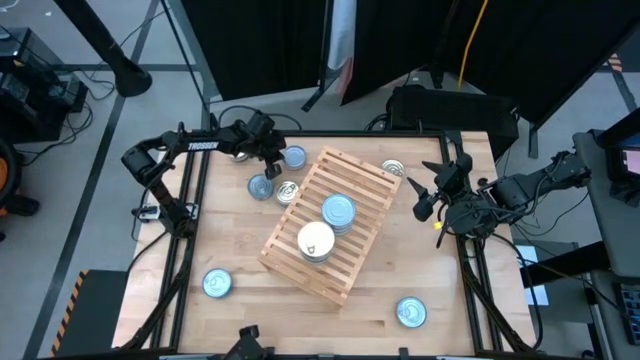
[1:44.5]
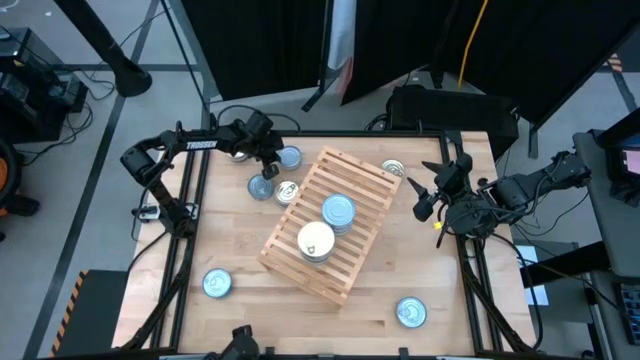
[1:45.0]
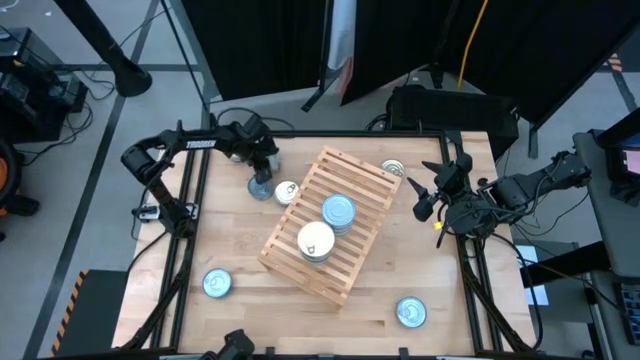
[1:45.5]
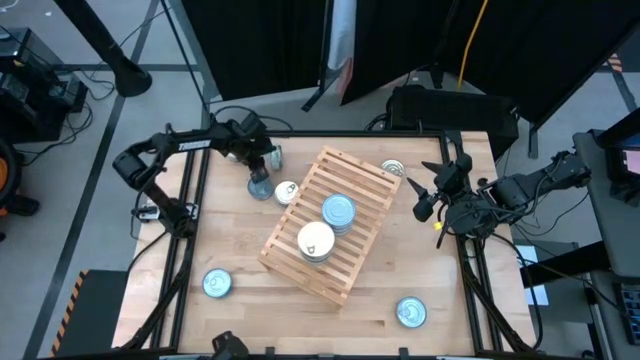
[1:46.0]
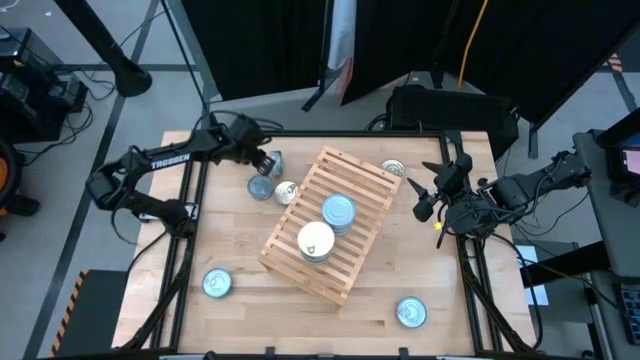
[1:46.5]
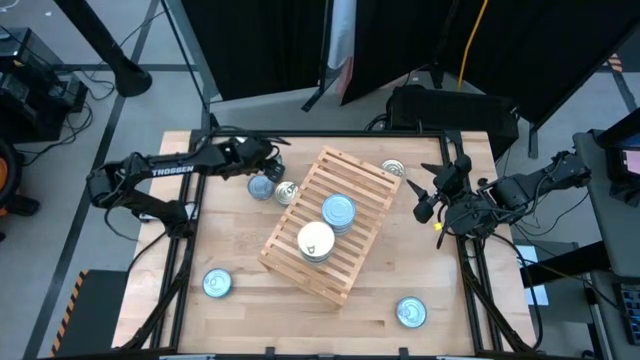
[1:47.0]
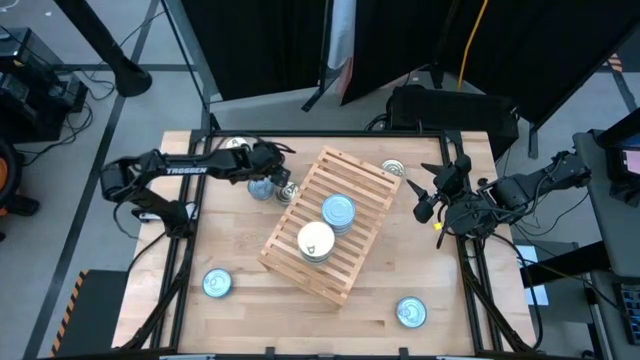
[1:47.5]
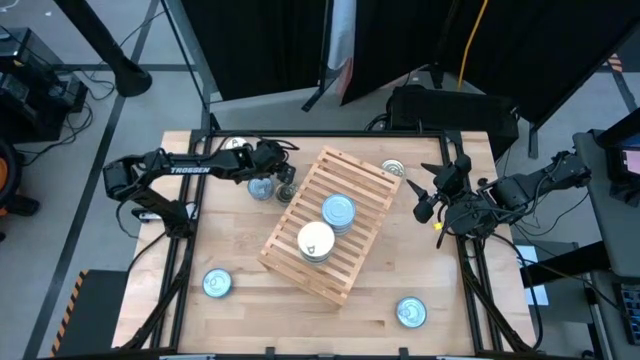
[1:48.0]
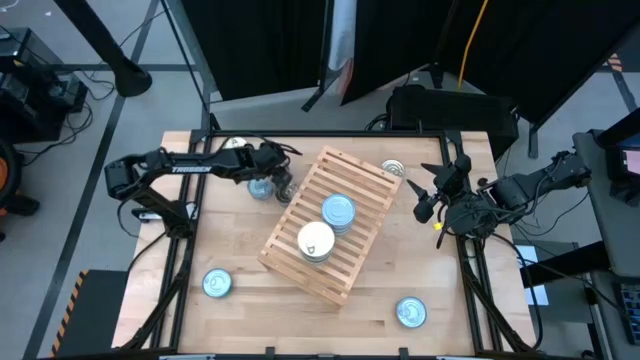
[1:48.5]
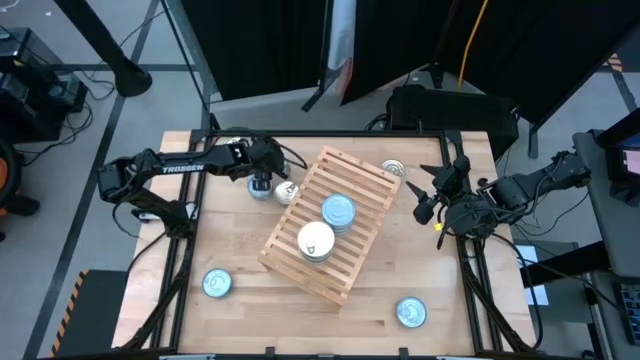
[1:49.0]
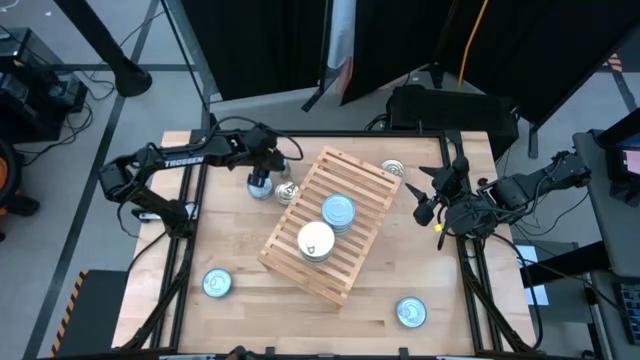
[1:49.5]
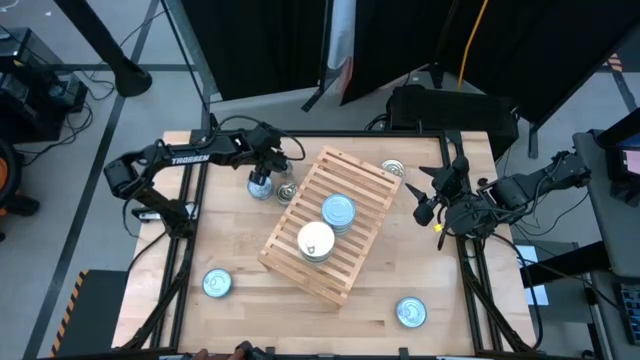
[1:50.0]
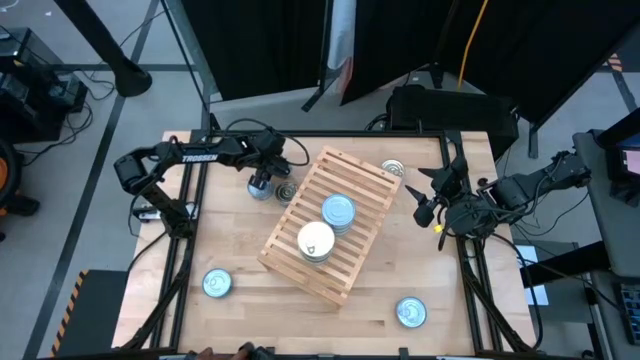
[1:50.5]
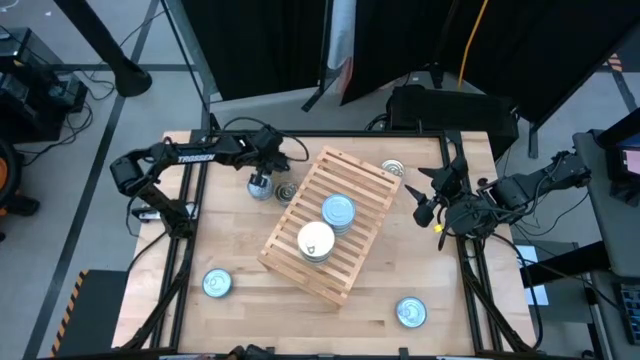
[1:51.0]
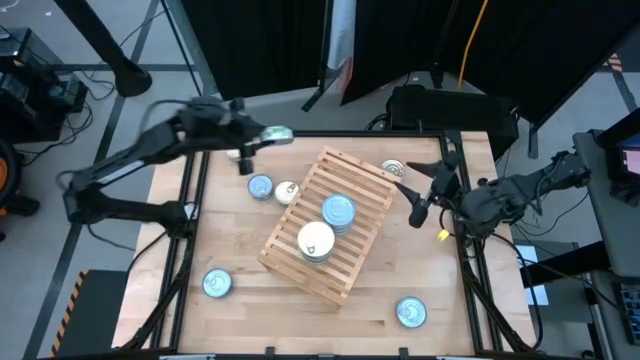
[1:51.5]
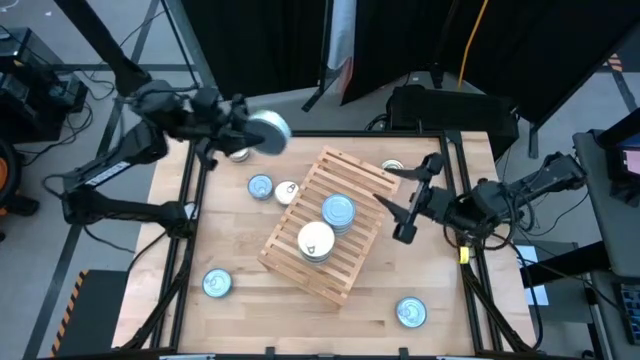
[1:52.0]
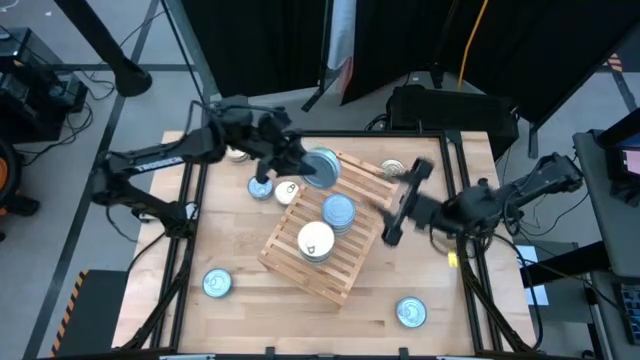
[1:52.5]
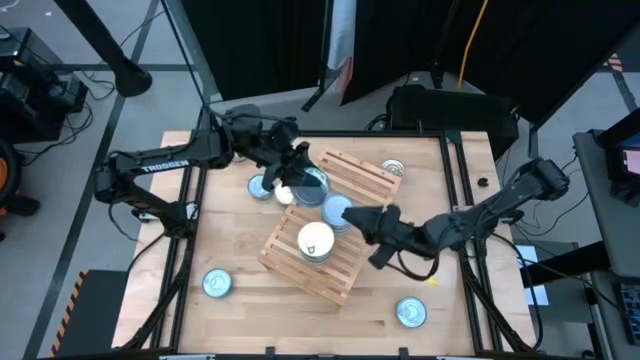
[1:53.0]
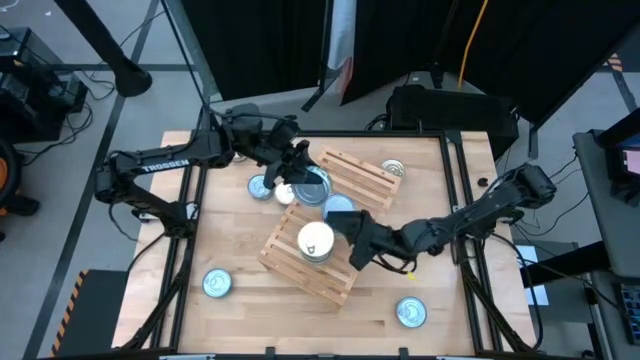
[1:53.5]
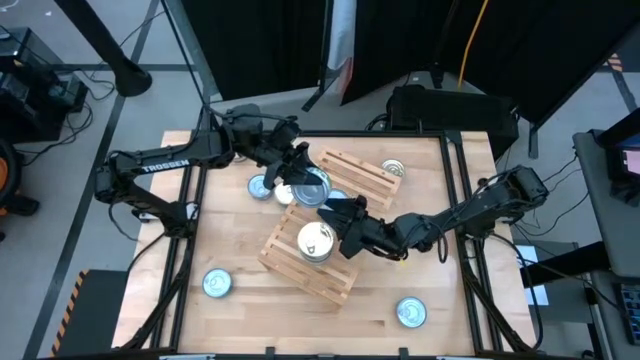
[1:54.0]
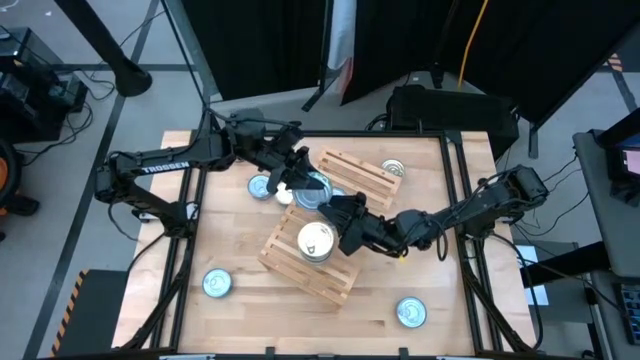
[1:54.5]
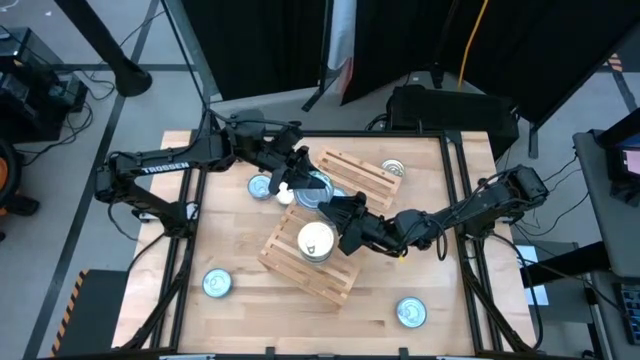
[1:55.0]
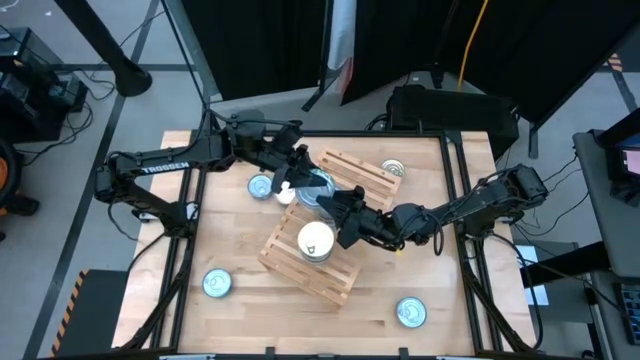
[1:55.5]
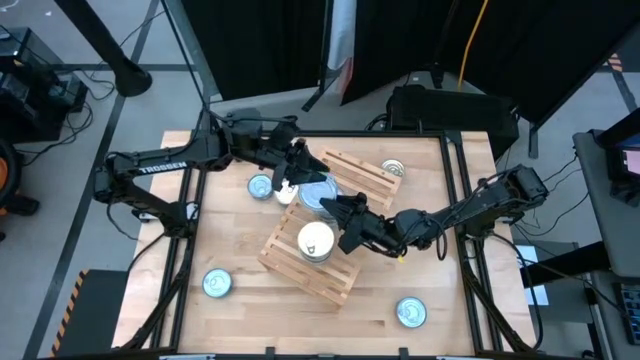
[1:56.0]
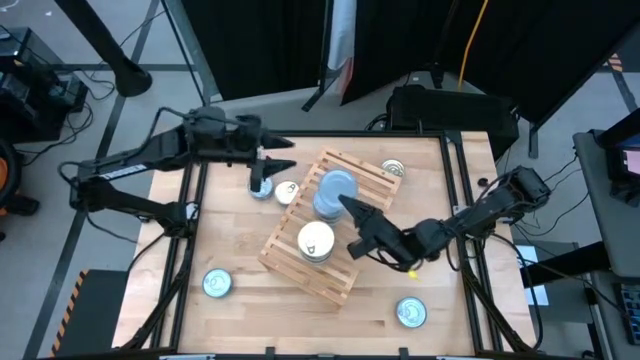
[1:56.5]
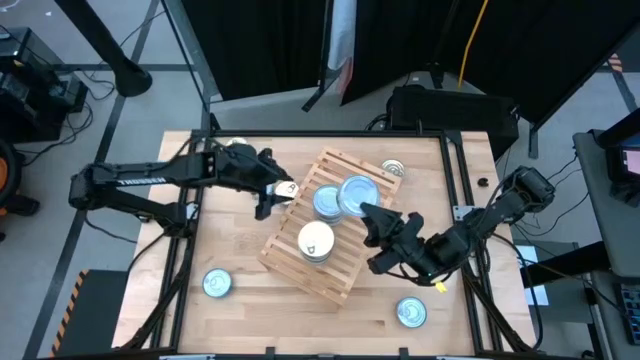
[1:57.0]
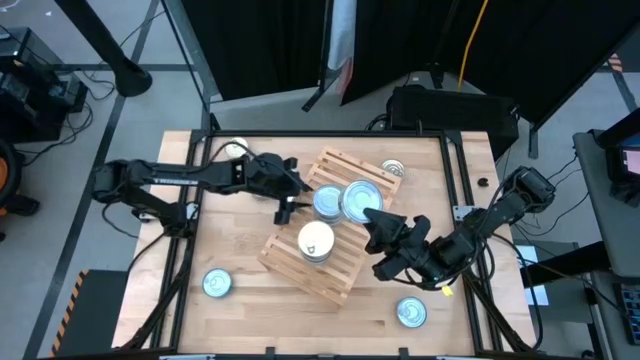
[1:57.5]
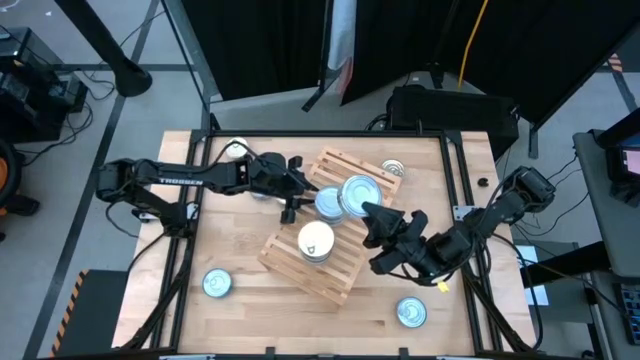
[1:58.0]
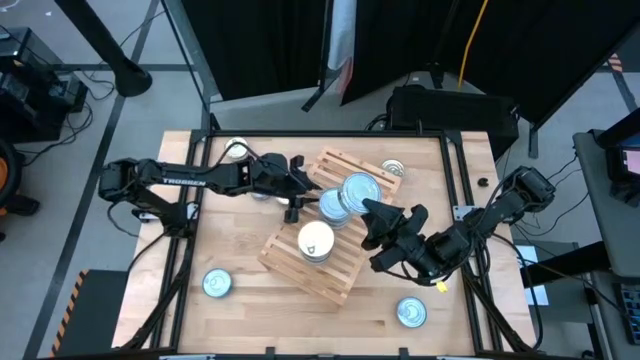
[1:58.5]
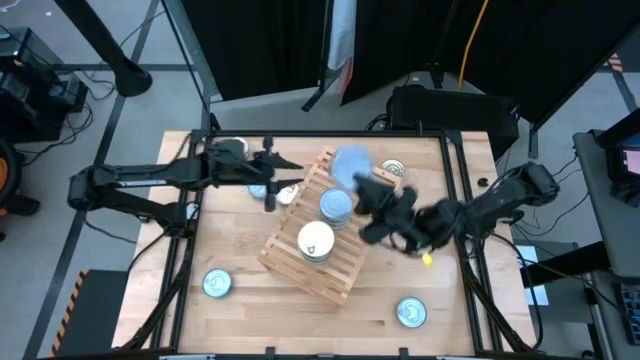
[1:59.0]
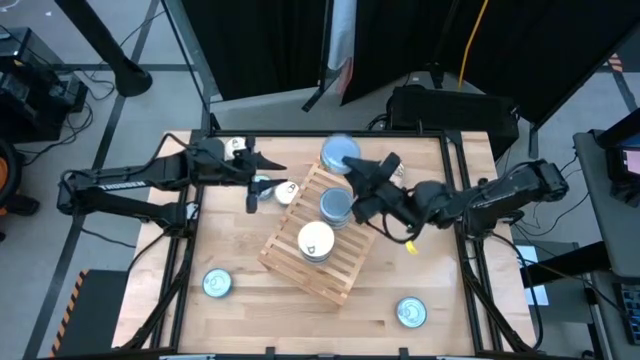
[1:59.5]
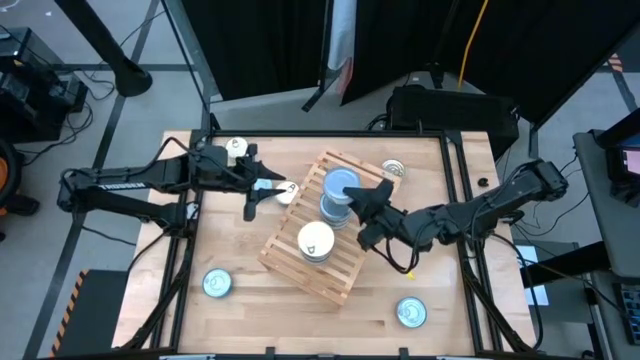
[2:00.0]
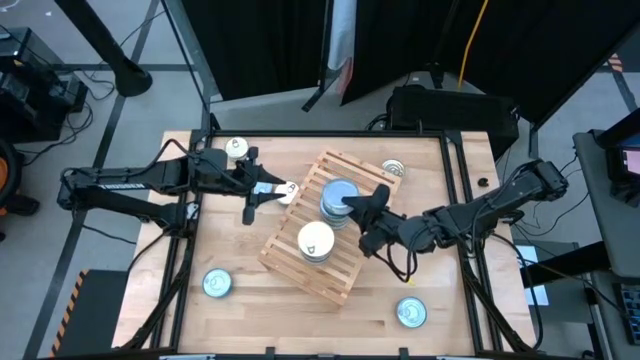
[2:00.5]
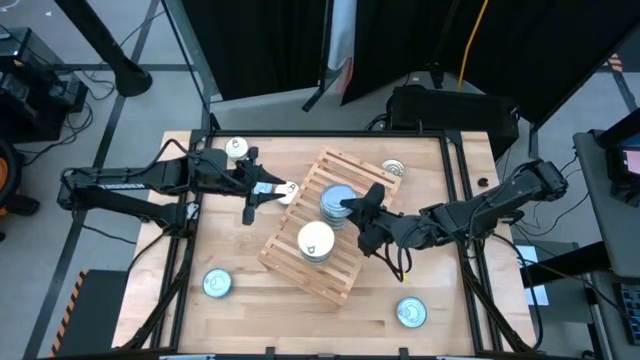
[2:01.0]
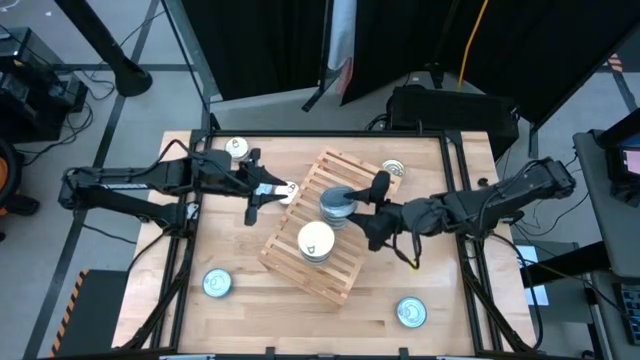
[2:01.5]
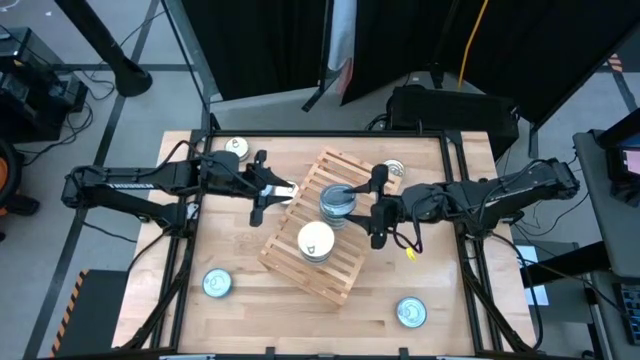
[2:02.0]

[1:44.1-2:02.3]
Task: Stack canned seafood by type on shelf
Stack the green tuna can on top of the other green tuna can on the shelf

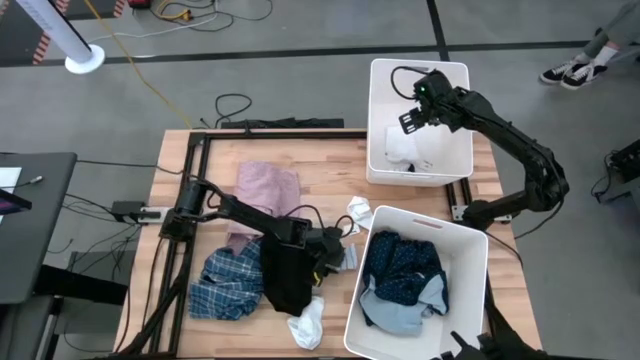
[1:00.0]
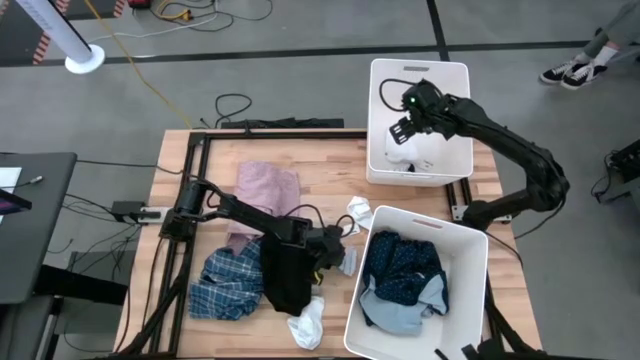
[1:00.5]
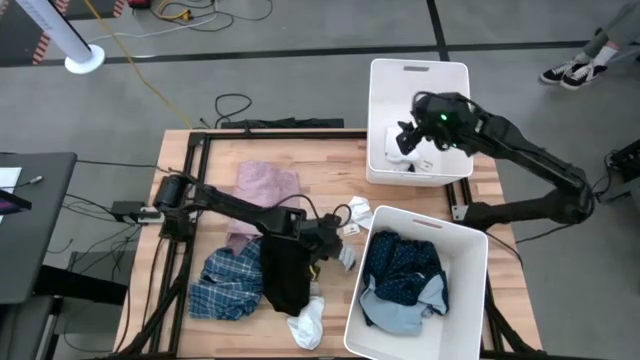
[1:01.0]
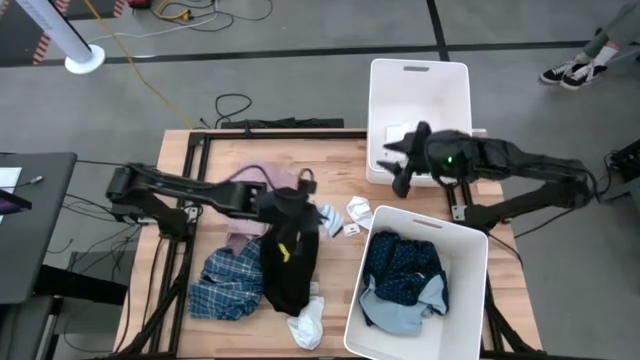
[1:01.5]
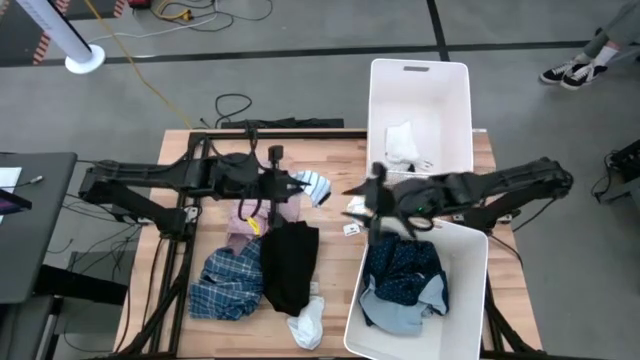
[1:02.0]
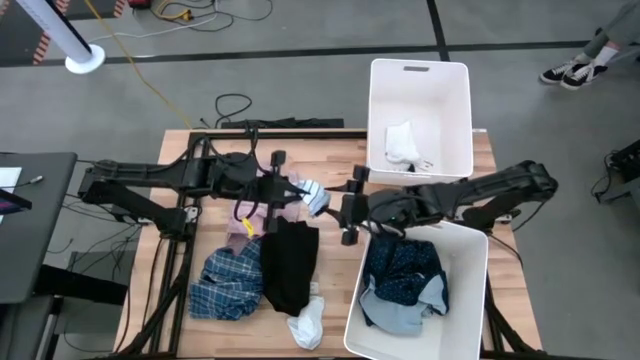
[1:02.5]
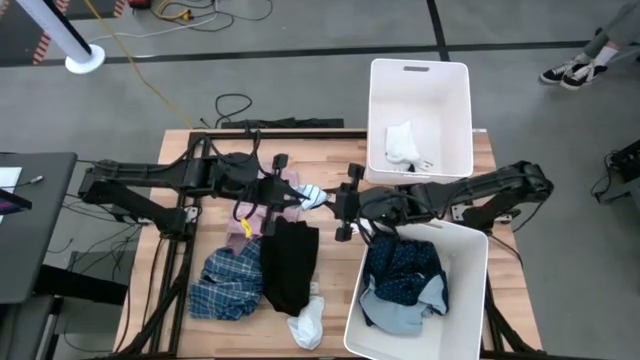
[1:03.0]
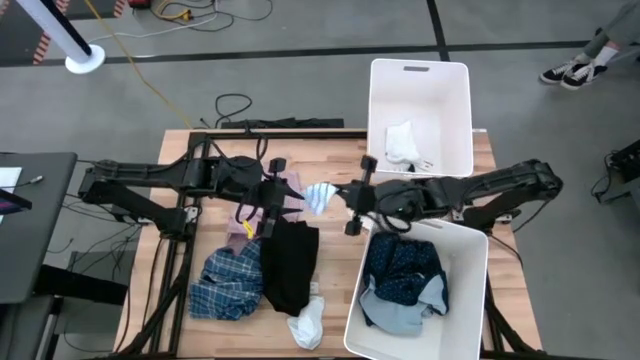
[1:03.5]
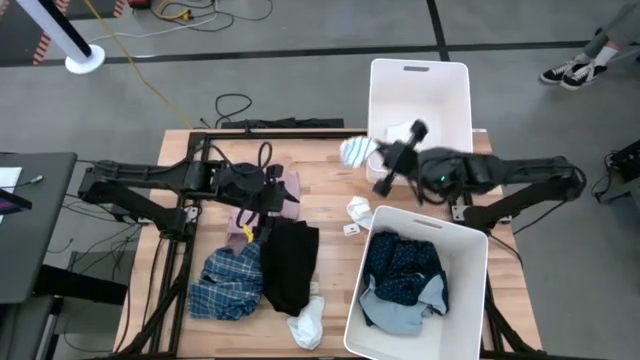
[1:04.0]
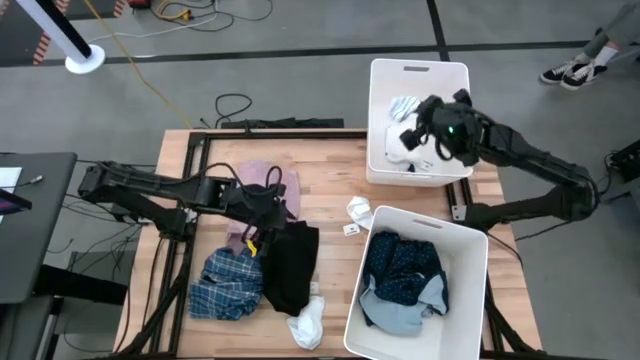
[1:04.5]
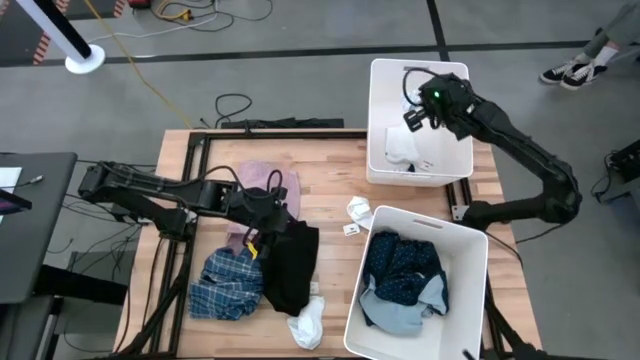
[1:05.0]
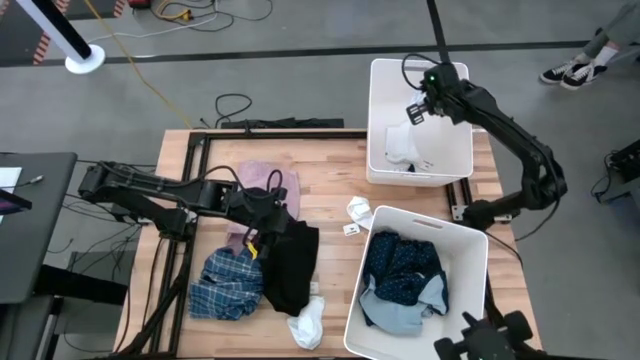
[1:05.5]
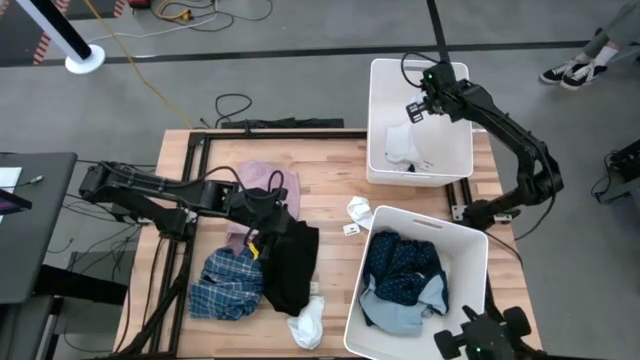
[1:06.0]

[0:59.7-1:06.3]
Task: Sort clothes
Put the striped white sock in the top laundry bin
